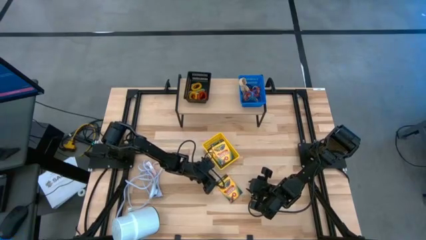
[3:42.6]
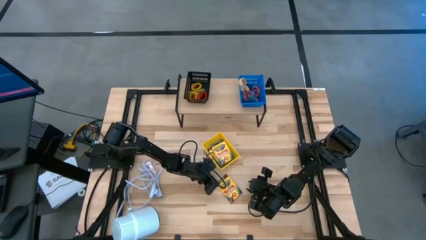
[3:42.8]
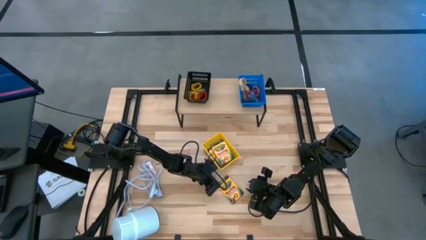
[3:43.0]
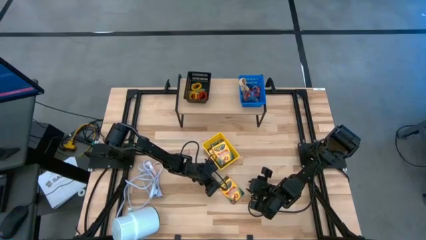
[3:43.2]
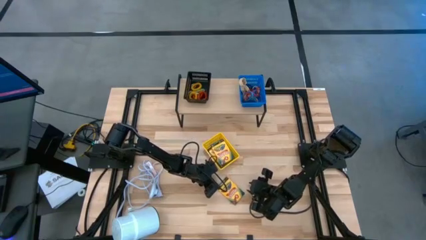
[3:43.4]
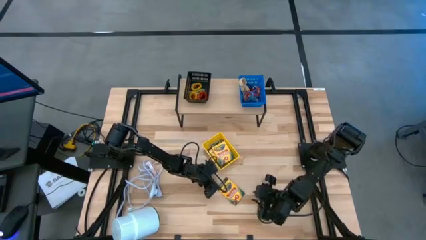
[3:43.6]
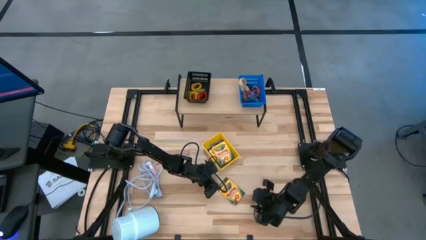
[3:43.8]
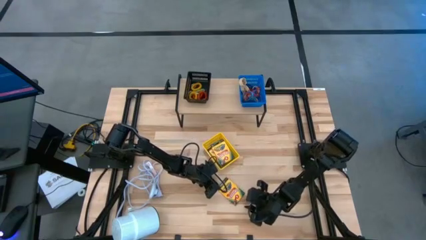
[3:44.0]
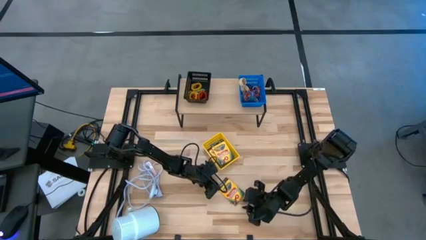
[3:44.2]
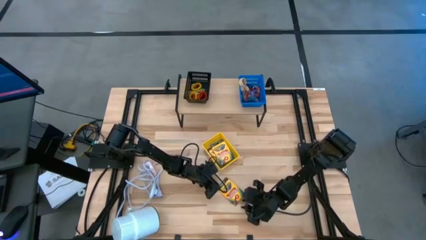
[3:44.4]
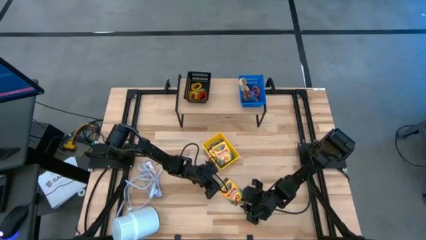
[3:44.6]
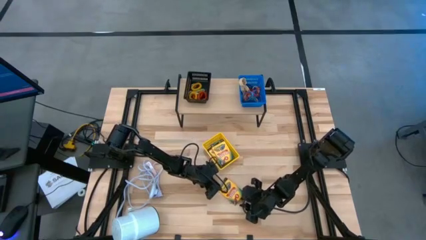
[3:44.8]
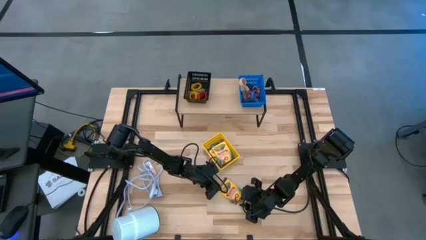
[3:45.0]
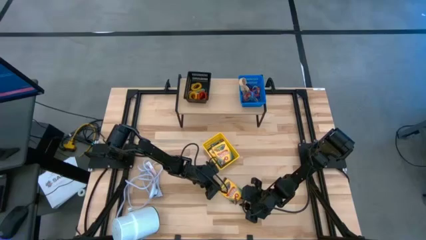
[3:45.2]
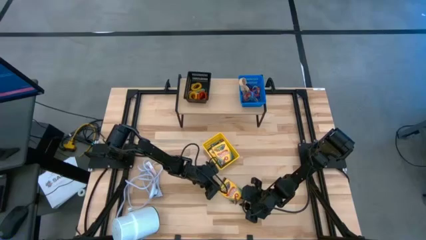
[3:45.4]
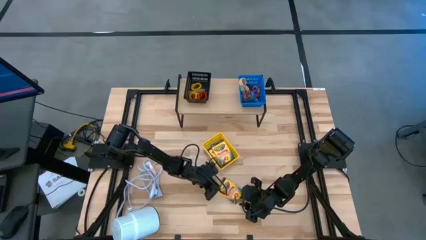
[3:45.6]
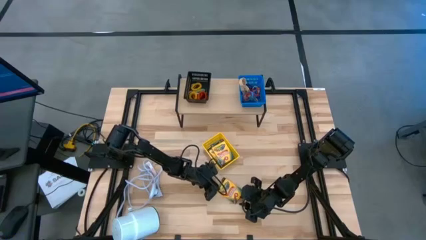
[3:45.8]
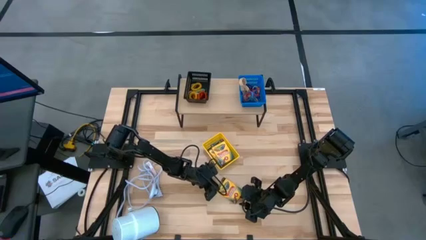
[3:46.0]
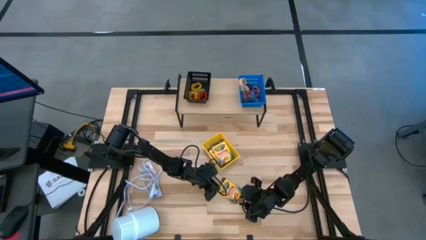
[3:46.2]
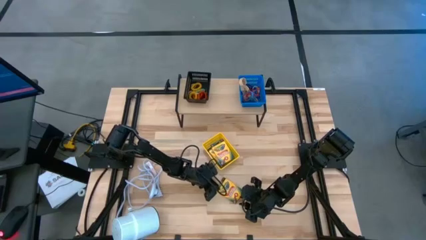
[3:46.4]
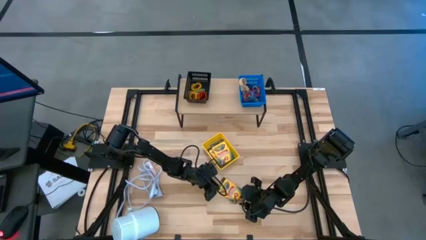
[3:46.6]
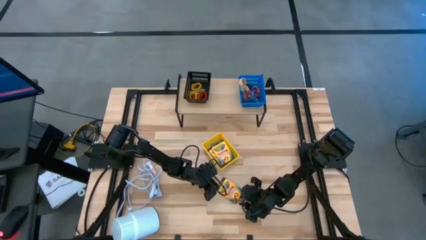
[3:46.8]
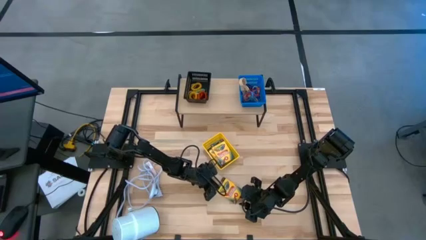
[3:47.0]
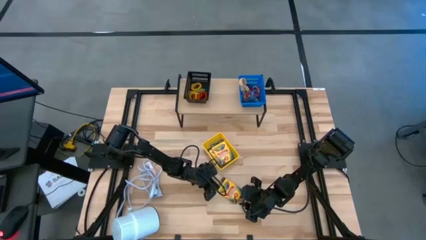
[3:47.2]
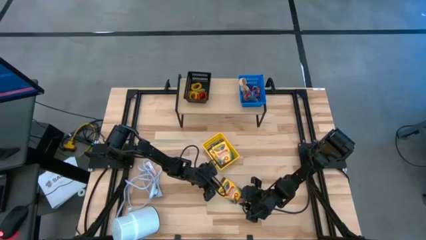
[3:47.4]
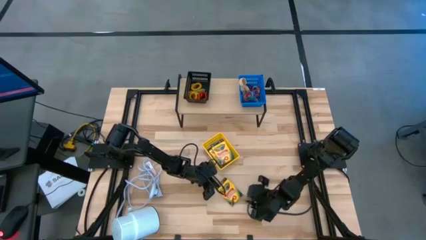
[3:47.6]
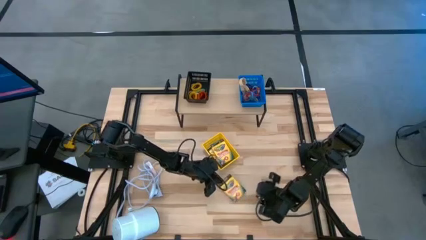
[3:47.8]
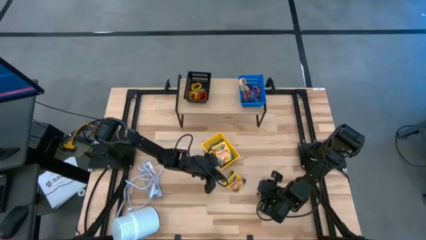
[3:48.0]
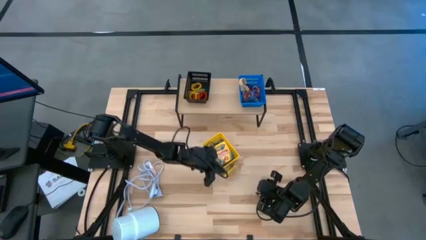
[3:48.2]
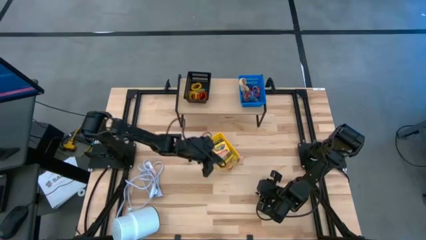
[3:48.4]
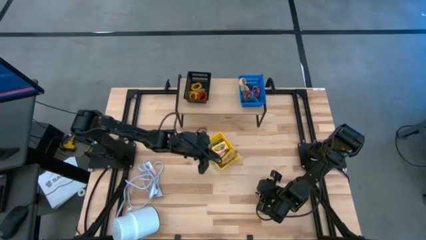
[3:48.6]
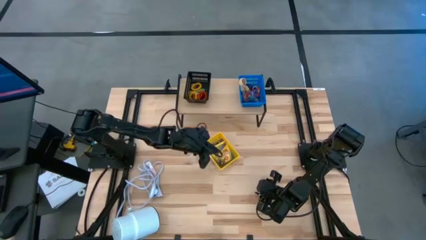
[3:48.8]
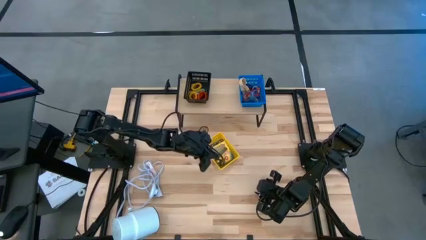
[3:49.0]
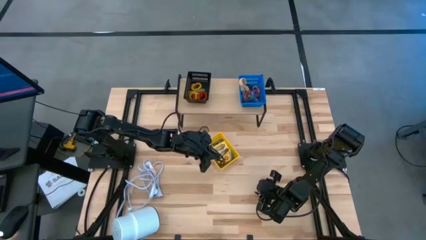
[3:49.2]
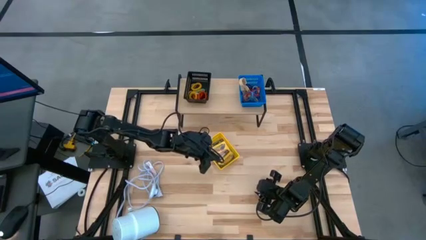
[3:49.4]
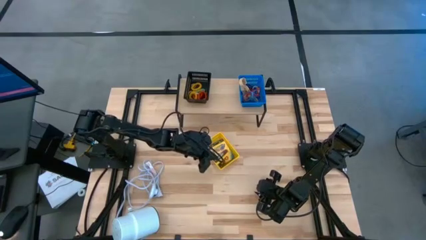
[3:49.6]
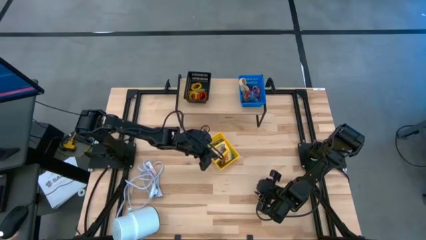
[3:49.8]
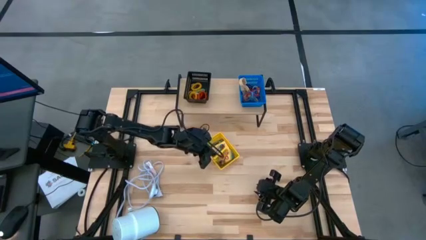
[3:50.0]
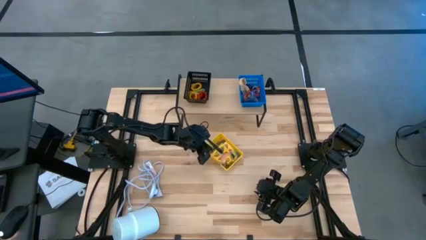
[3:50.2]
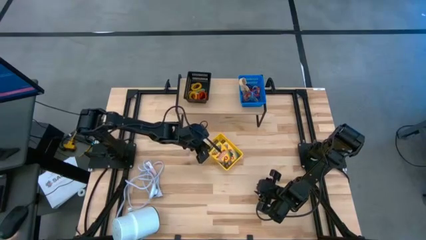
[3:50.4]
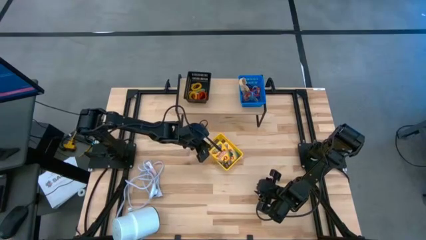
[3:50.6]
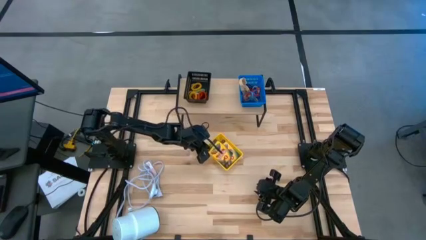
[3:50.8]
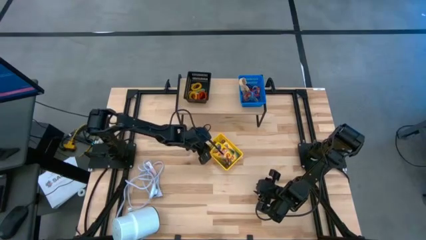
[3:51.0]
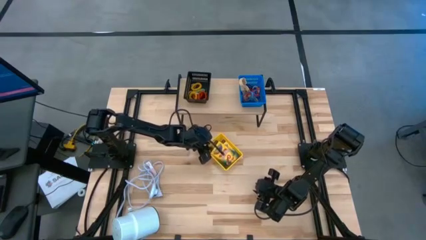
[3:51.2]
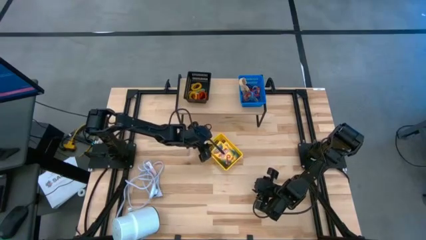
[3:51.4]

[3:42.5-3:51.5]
Task: Pick & Place Office Desk Supplies
Put the yellow crayon box into the yellow bin

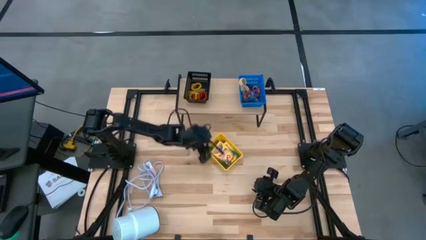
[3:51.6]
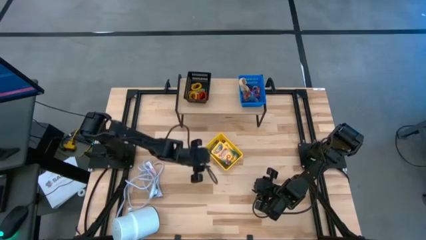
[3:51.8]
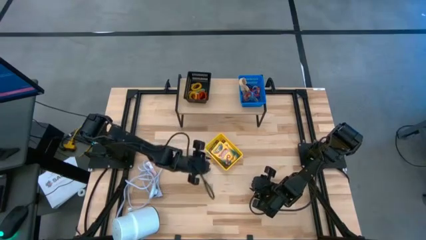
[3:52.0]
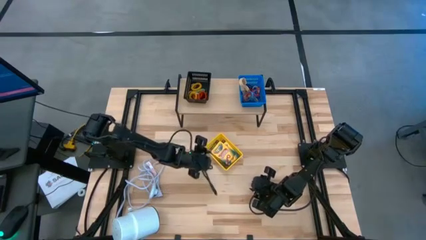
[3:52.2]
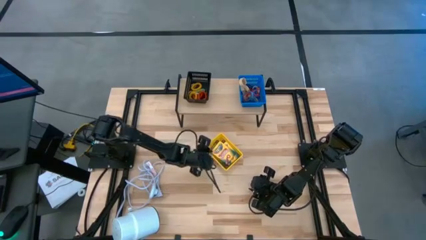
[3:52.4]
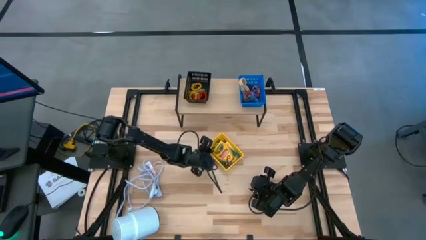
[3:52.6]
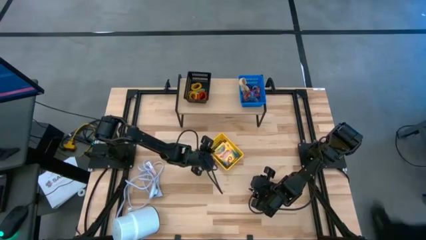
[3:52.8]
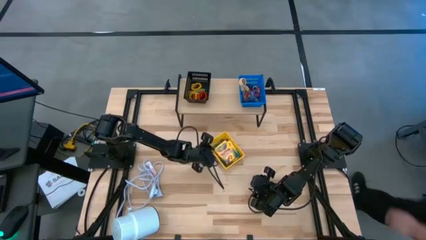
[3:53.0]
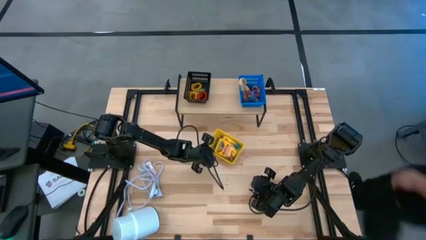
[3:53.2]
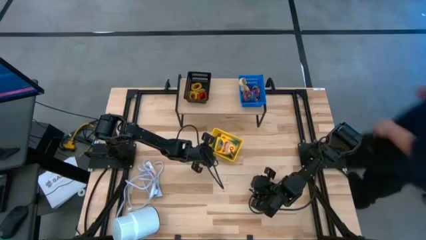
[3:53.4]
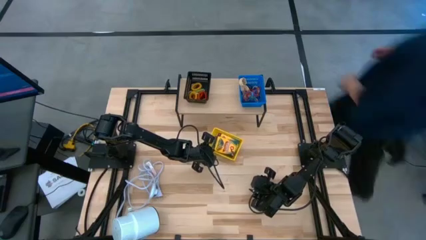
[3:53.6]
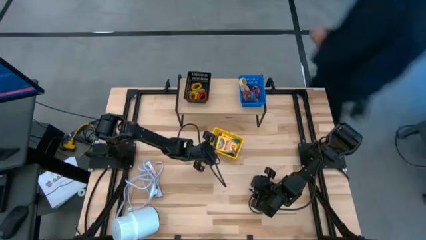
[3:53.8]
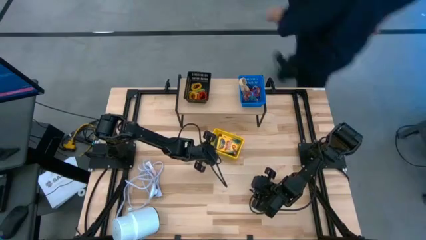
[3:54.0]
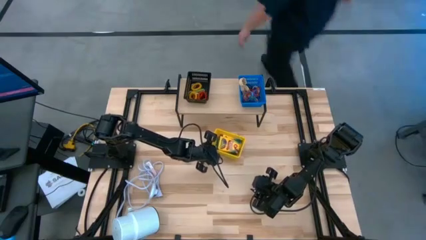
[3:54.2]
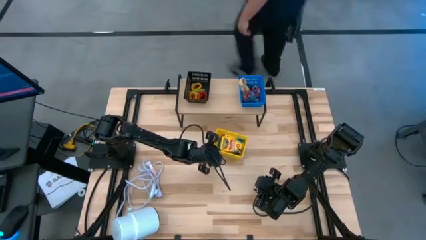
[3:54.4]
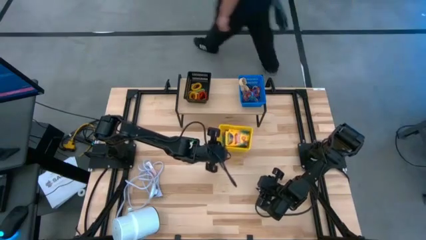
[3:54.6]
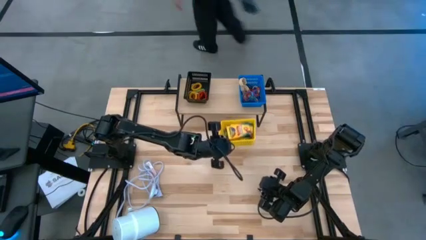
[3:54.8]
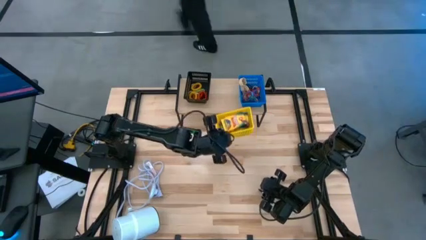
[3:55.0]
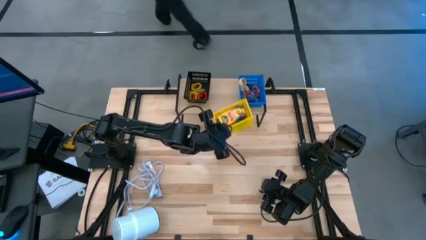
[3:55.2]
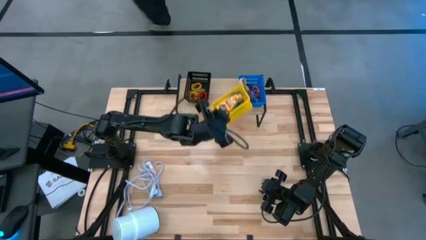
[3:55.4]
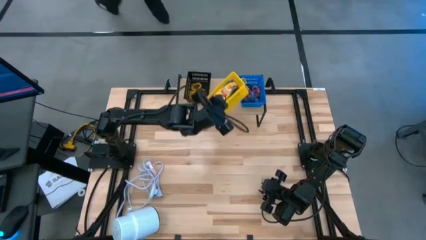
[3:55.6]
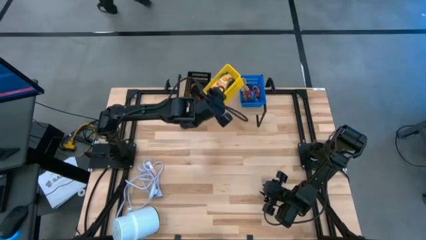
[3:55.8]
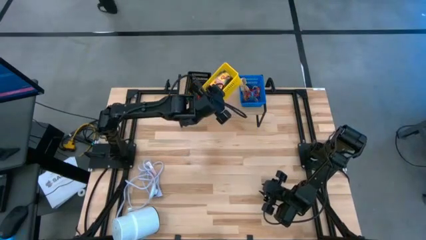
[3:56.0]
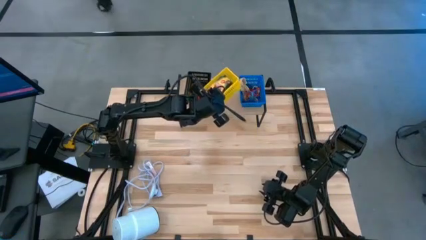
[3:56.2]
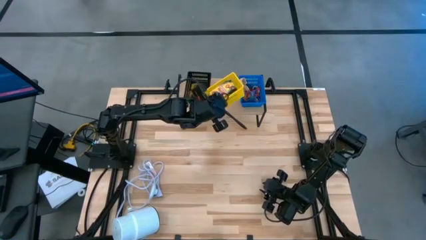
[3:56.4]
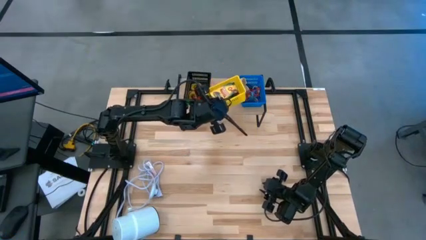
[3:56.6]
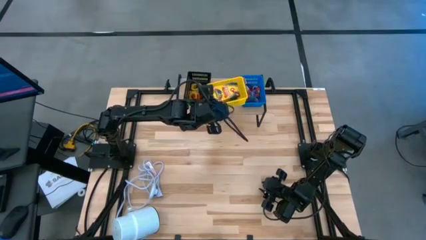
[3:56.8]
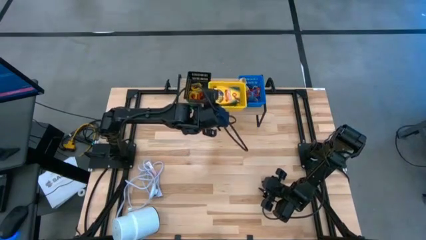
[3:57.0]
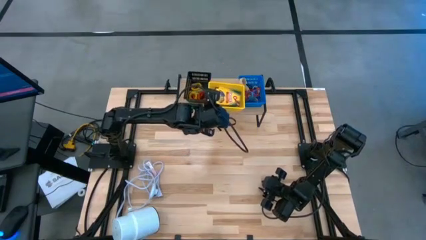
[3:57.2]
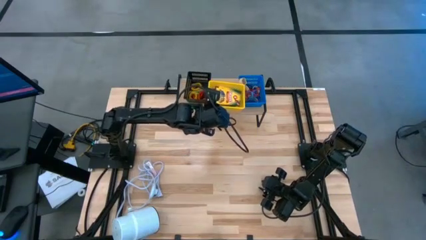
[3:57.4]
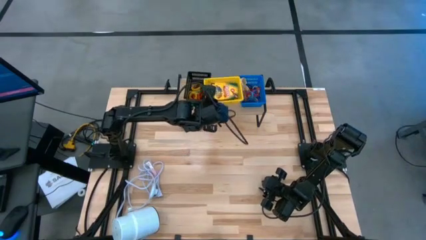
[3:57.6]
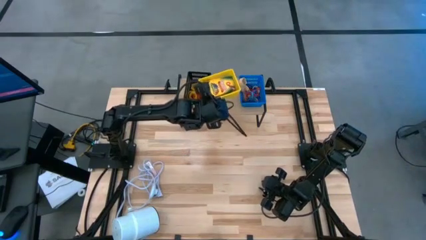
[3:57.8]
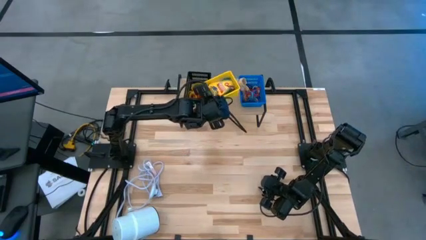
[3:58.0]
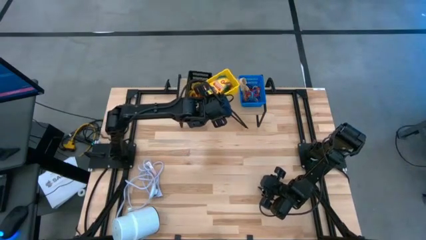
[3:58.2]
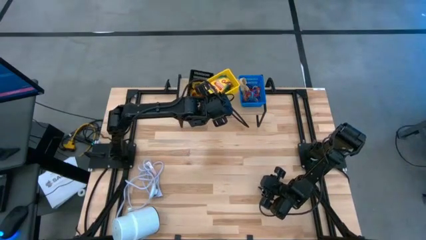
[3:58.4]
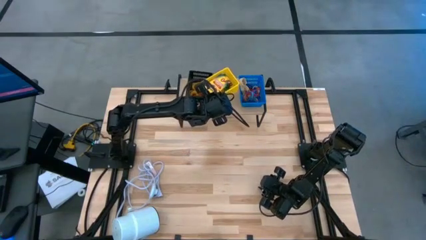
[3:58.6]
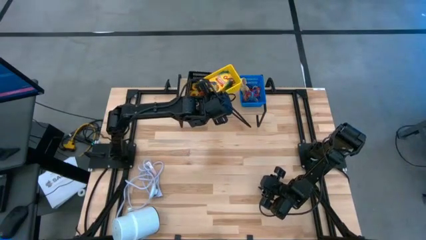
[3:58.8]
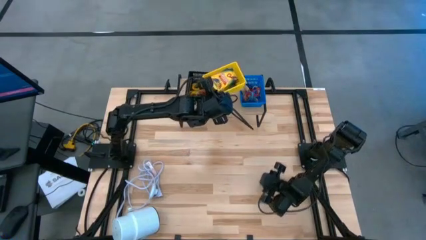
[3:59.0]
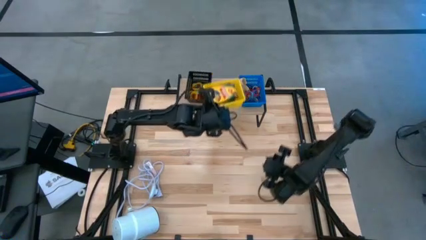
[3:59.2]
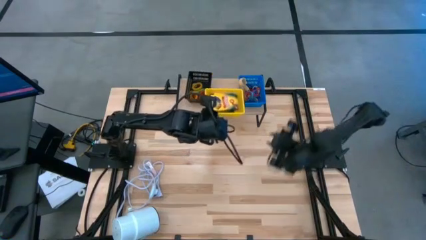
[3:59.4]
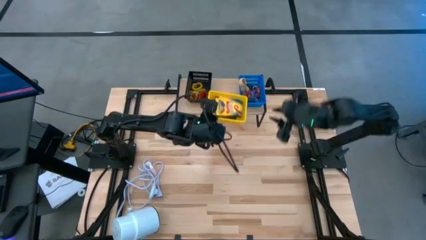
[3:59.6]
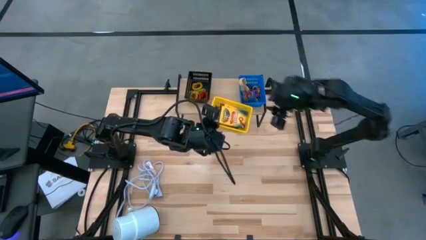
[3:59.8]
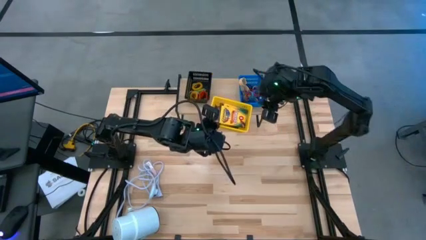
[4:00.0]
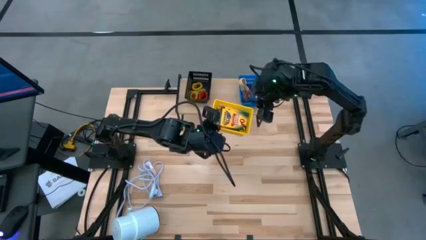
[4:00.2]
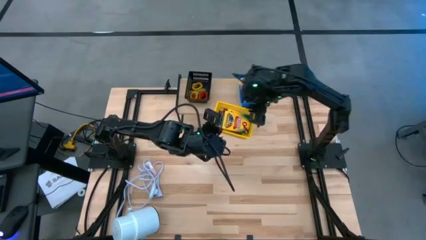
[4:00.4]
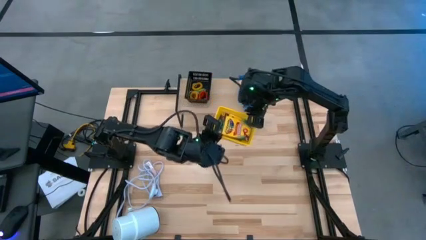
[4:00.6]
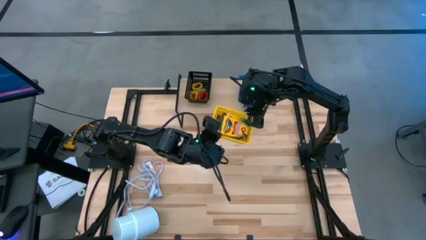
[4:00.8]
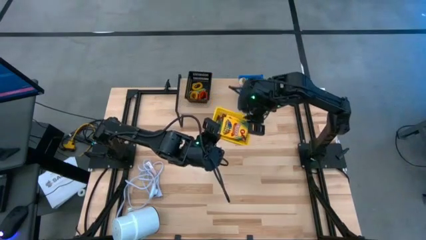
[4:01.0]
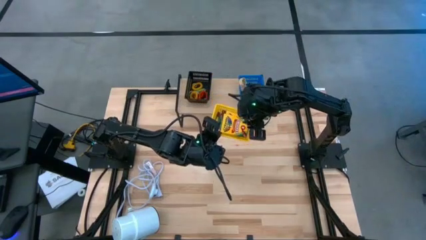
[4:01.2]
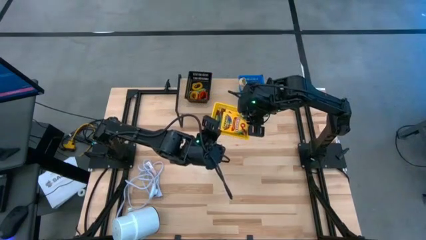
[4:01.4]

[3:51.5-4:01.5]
Put the yellow bin on top of the shelf
